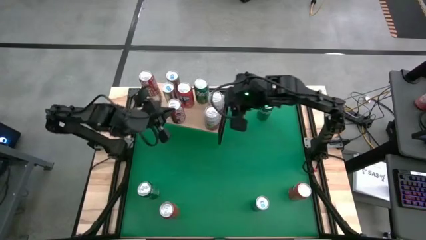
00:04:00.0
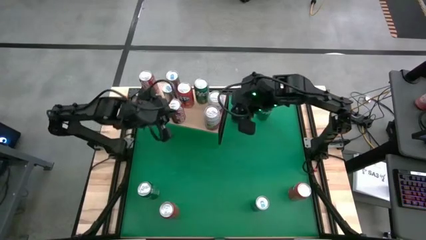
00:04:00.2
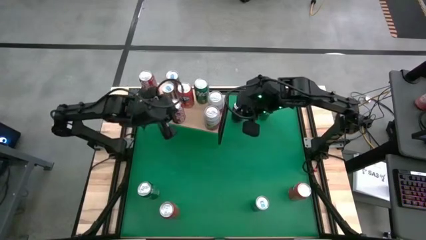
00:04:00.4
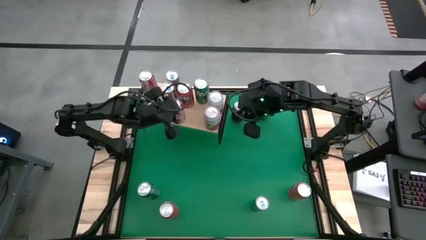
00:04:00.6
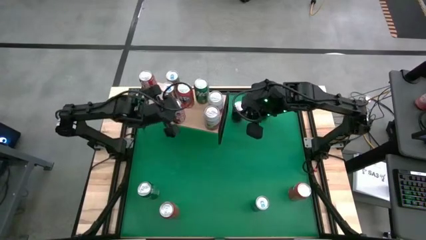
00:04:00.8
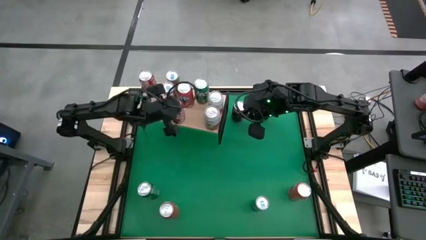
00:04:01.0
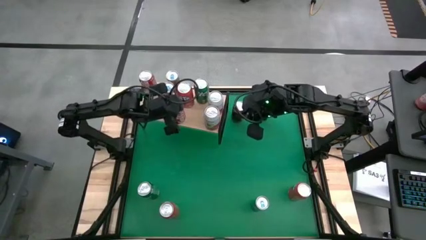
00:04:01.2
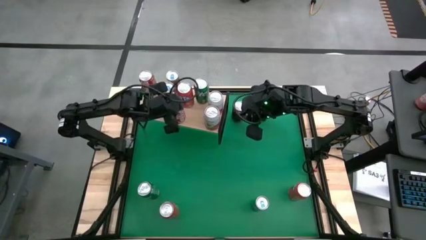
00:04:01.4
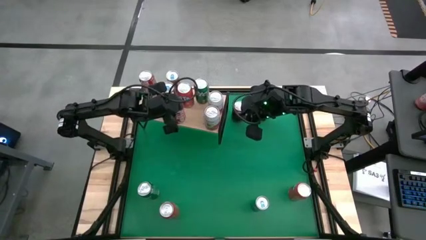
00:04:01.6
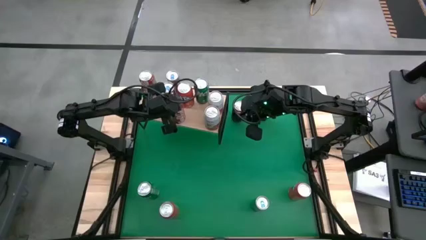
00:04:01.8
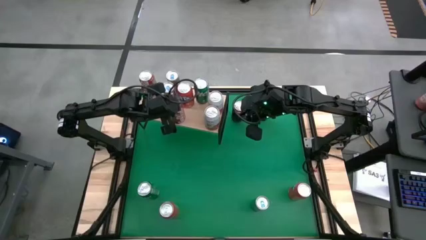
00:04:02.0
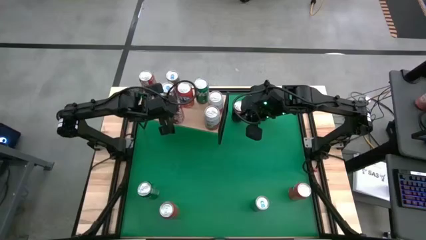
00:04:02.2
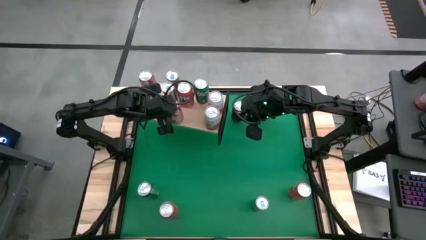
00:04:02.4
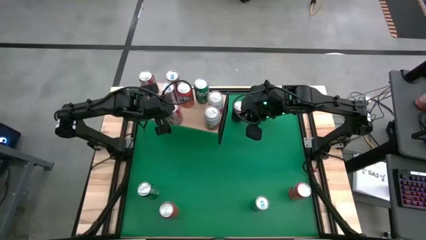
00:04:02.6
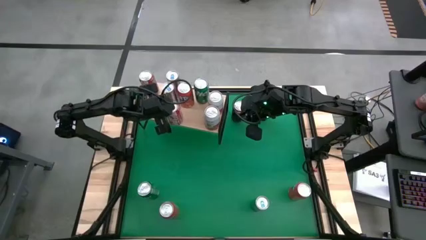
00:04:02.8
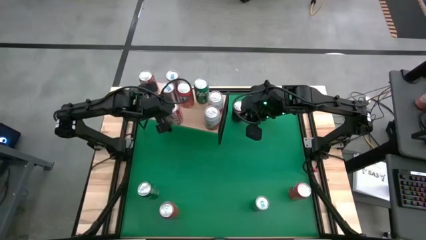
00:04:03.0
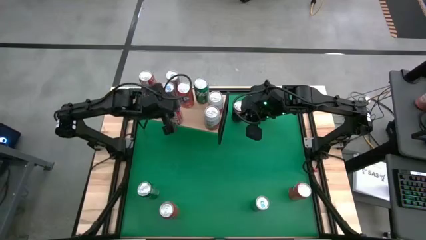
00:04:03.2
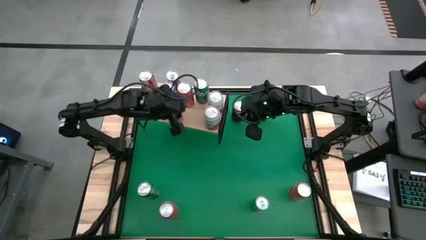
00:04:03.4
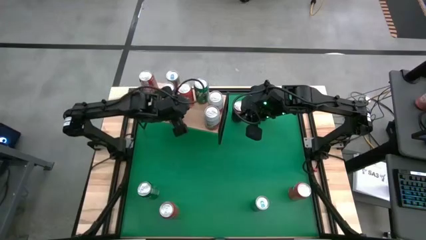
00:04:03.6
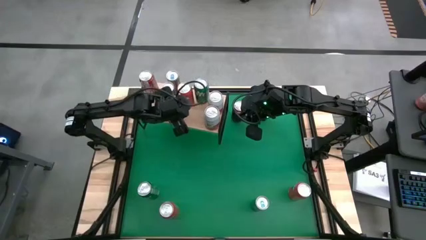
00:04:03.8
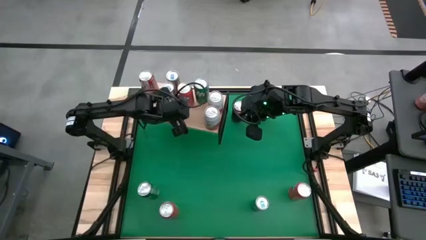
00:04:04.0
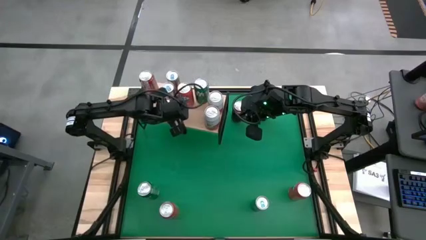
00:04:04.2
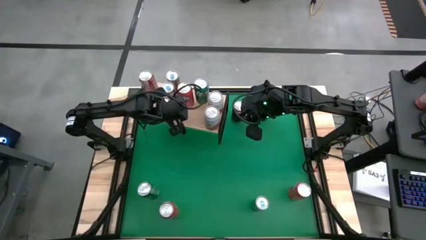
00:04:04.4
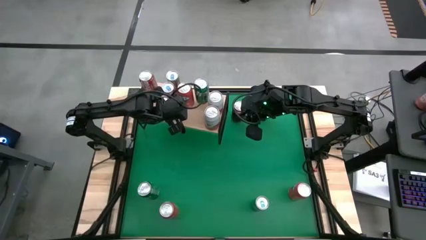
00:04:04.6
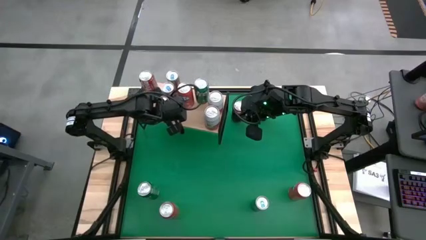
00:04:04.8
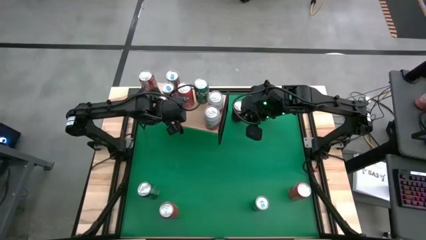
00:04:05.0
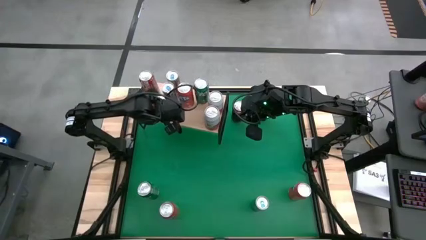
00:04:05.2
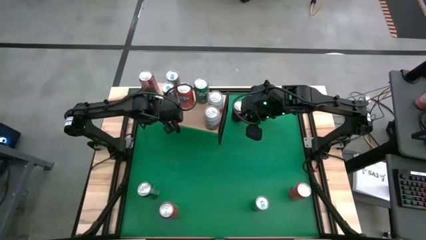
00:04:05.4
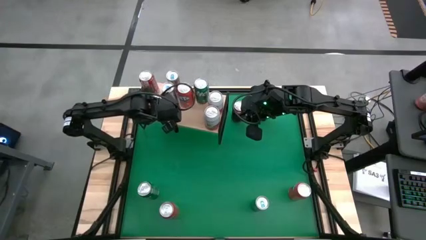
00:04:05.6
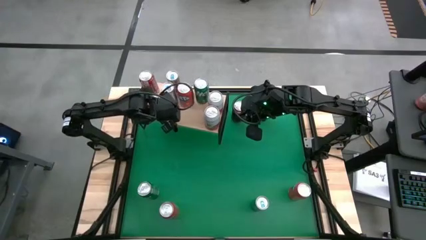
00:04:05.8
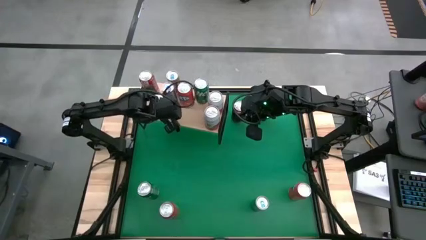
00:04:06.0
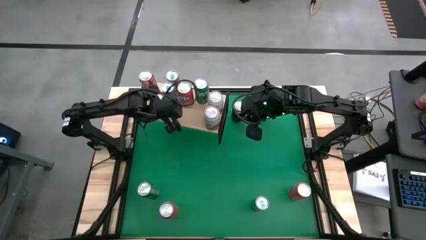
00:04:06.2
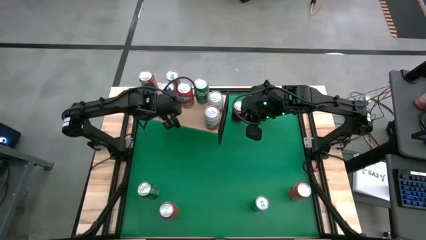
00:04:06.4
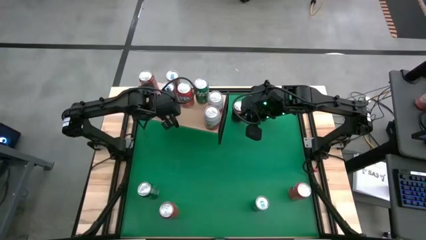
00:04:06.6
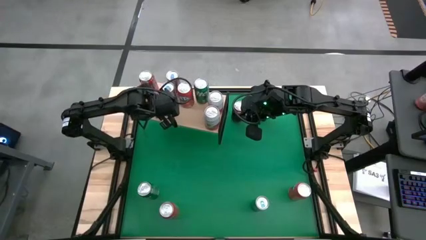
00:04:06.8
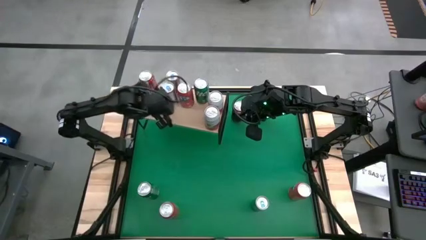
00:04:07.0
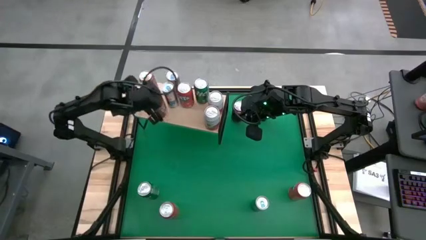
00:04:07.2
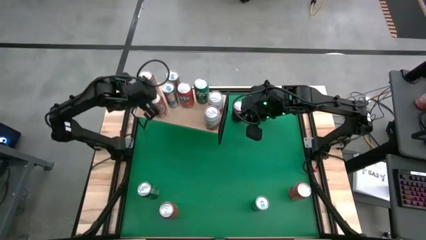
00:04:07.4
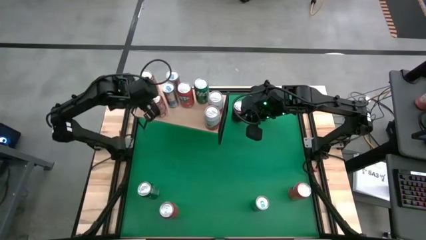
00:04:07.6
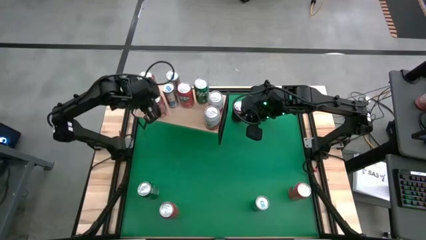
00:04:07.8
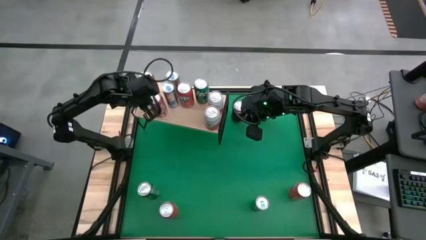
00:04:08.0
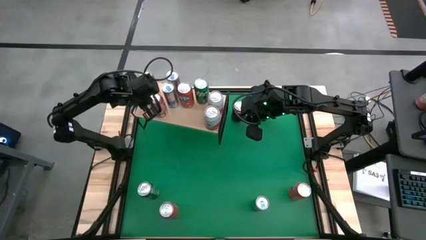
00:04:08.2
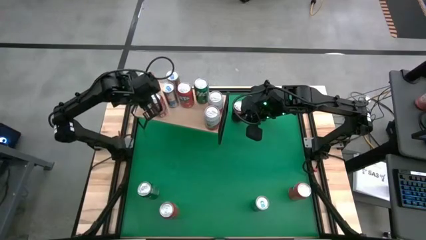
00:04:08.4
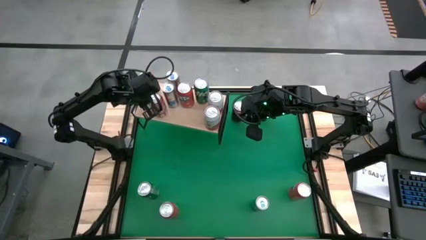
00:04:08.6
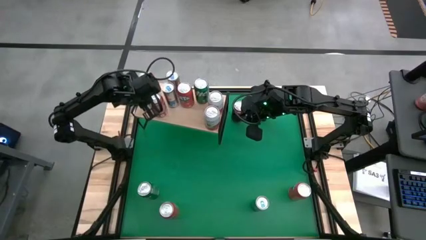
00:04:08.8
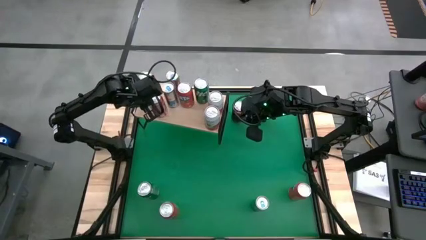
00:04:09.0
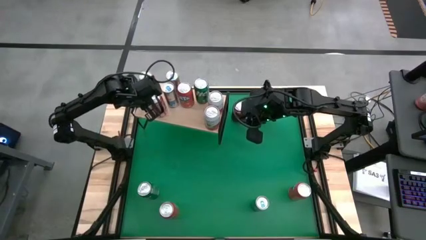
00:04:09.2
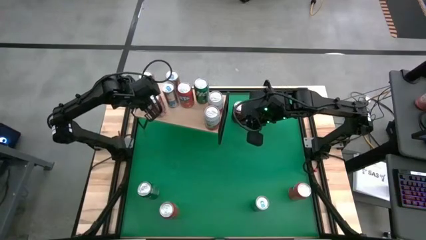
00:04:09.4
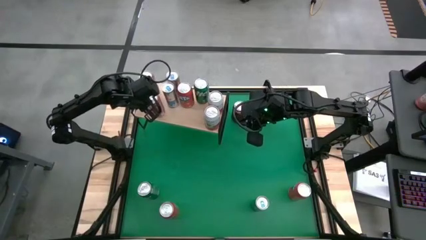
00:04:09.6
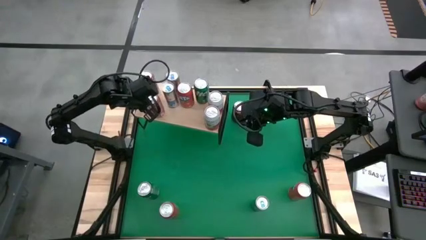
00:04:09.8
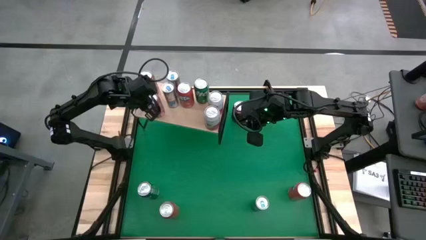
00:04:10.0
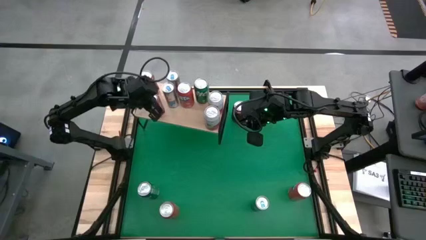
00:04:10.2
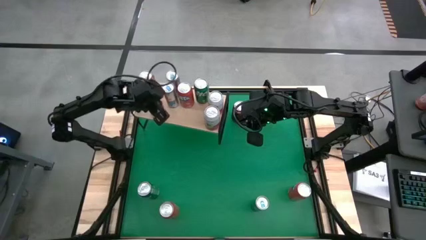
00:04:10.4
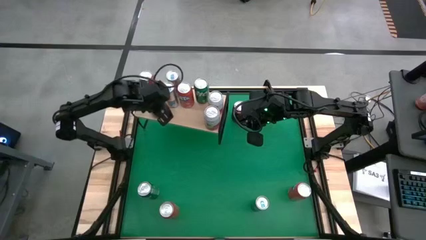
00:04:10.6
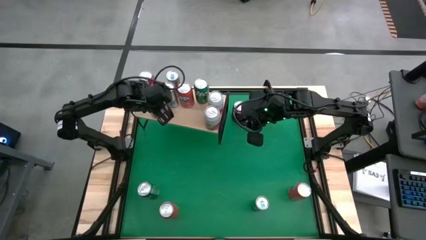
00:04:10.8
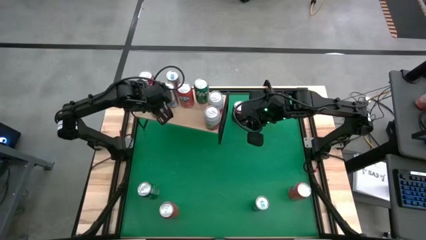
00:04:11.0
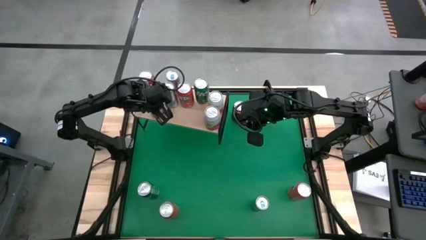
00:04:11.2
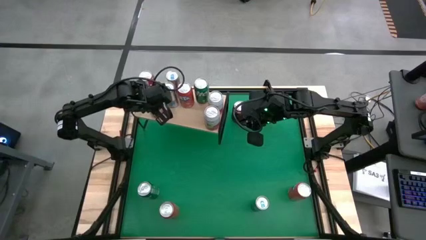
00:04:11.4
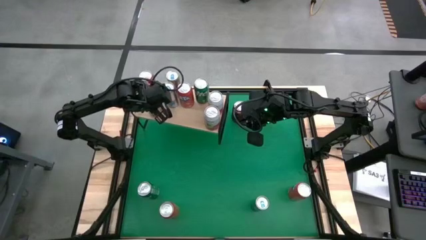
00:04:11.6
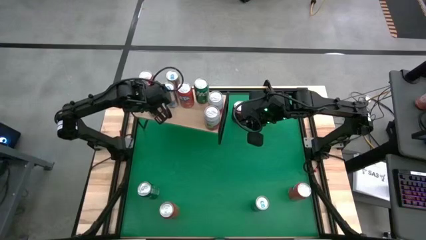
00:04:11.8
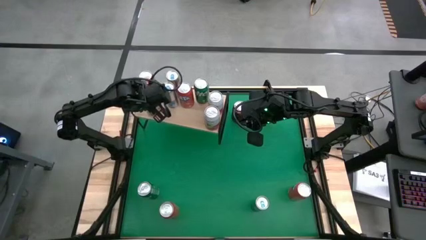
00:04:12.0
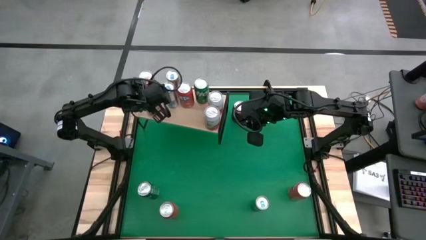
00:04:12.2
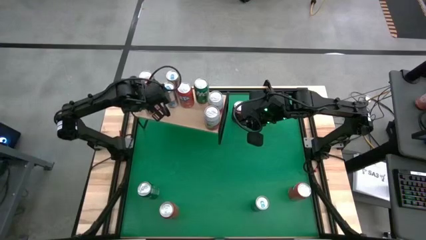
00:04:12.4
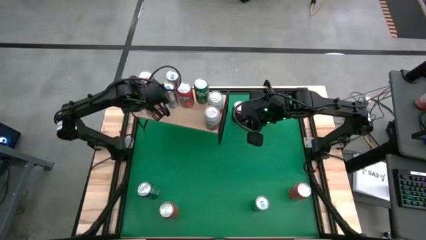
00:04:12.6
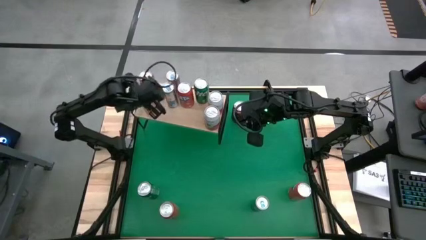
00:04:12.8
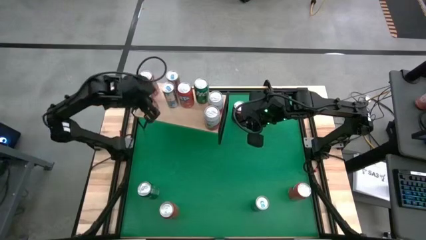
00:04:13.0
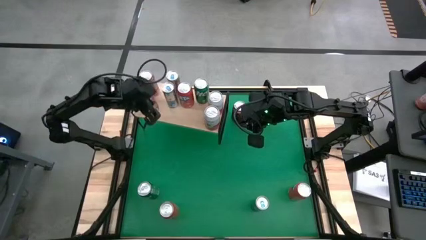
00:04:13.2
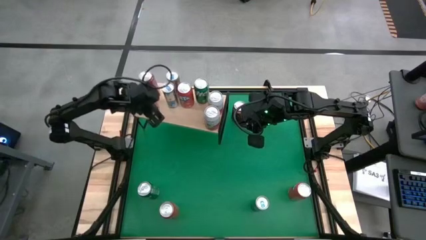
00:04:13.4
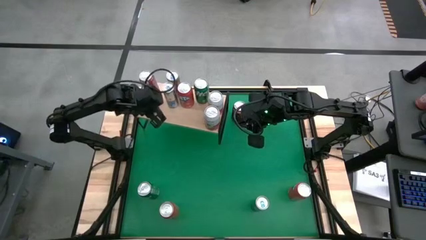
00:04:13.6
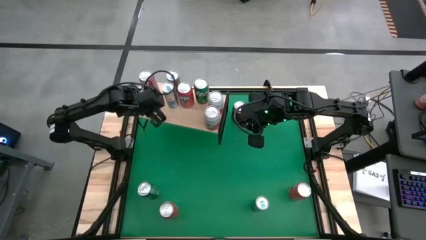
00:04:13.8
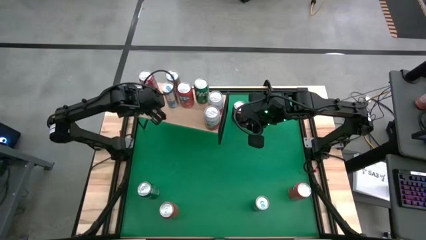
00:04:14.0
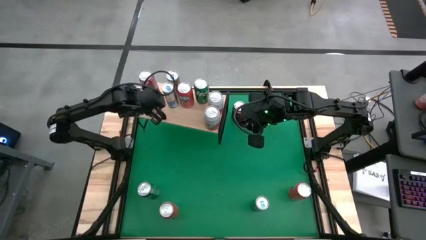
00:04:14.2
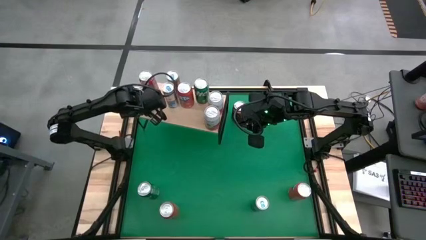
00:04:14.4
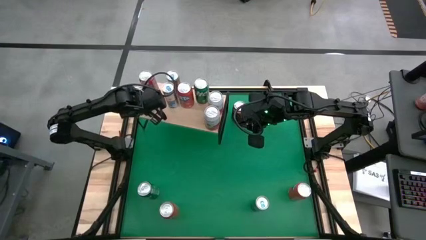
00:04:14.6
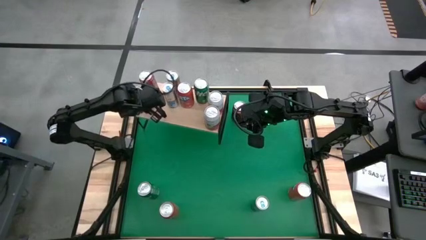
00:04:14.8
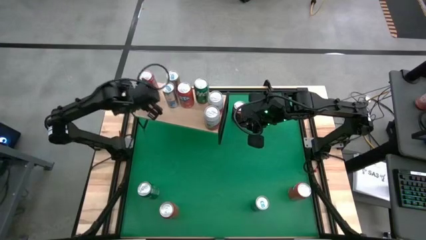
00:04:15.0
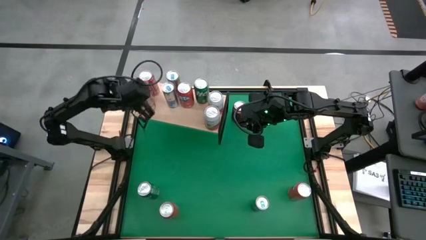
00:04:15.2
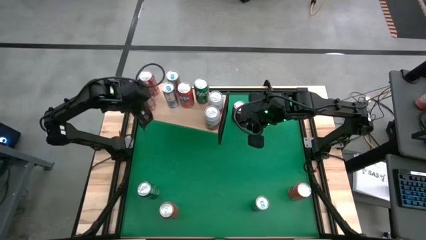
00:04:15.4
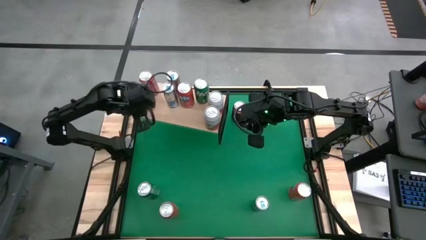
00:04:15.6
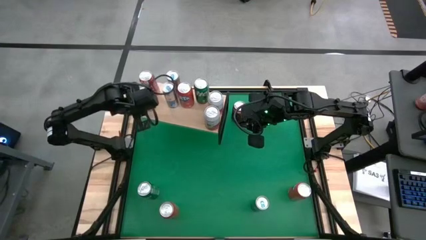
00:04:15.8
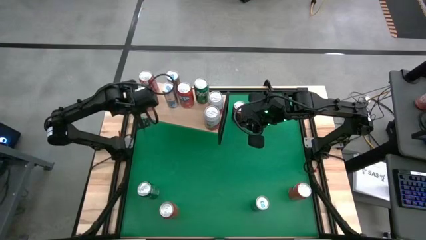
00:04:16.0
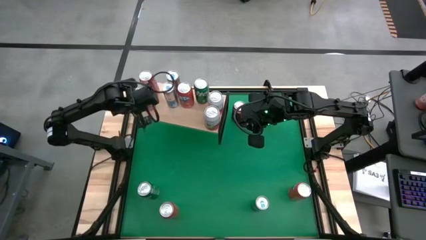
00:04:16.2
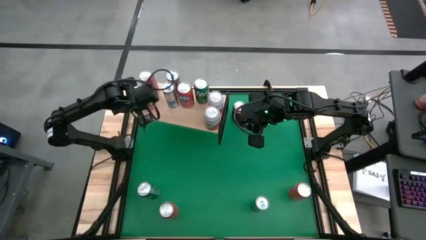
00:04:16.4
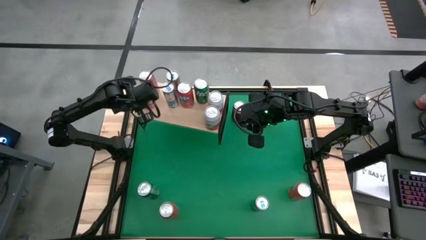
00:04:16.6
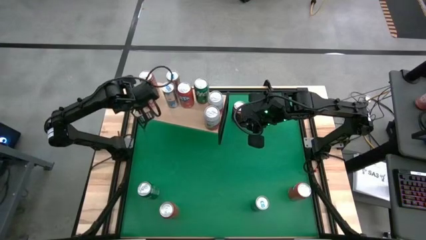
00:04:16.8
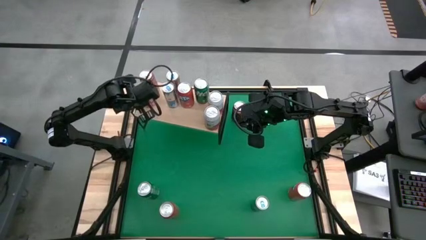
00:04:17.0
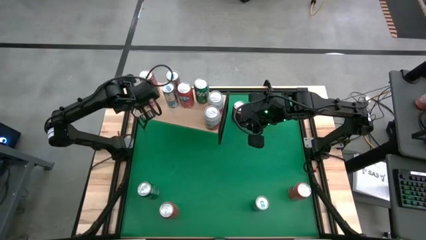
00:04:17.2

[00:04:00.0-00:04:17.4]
Task: Place canned beverage on shelf
Move the red/black soda can on the shelf aligned with the other red/black soda can
